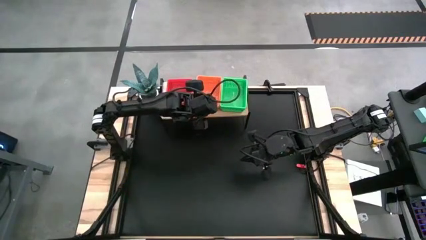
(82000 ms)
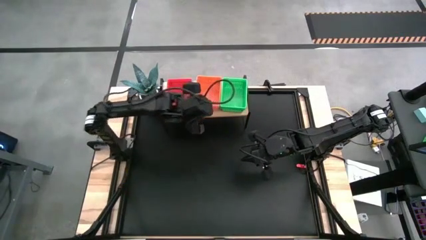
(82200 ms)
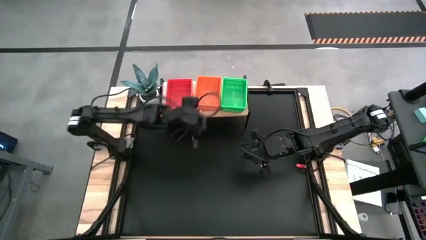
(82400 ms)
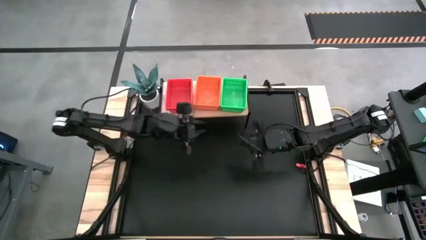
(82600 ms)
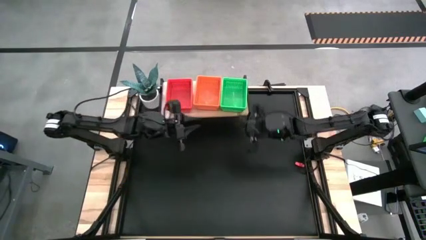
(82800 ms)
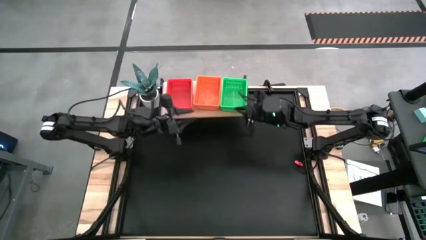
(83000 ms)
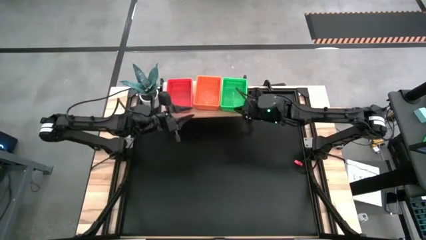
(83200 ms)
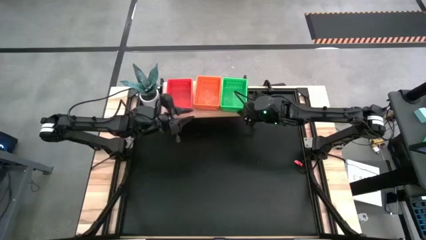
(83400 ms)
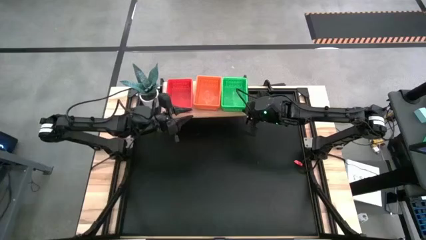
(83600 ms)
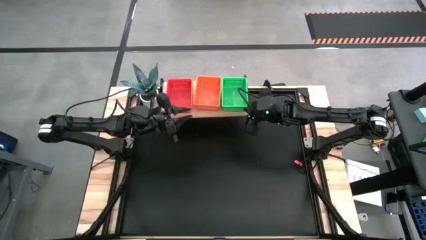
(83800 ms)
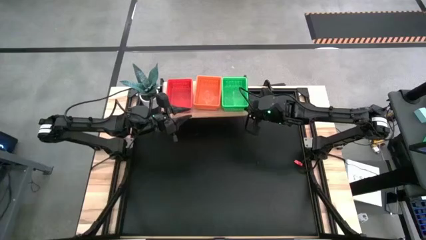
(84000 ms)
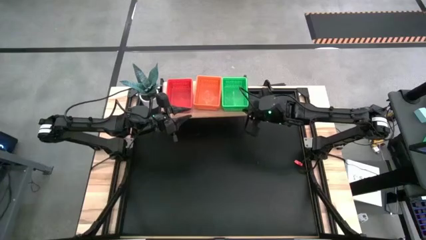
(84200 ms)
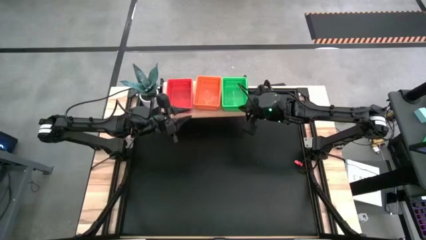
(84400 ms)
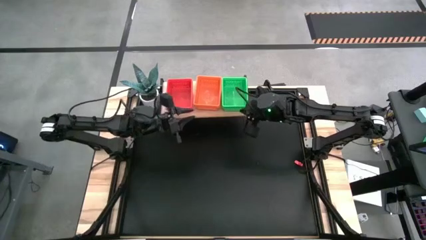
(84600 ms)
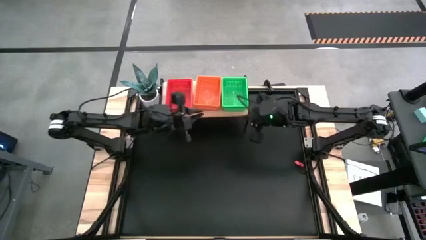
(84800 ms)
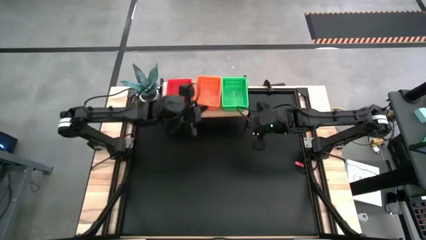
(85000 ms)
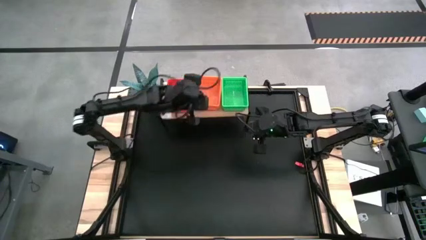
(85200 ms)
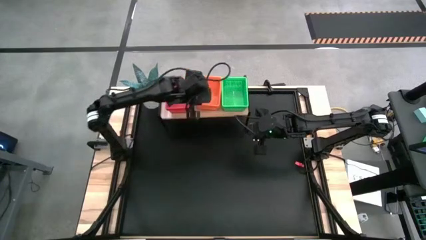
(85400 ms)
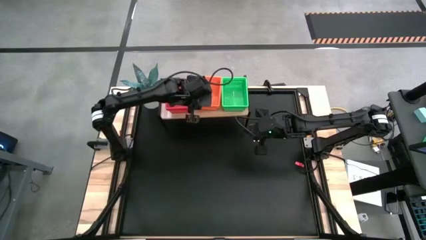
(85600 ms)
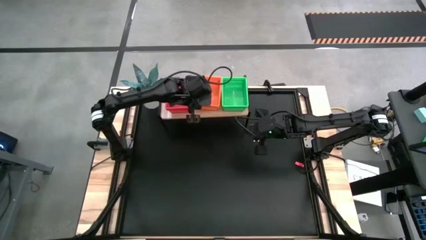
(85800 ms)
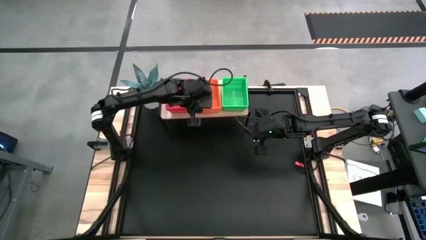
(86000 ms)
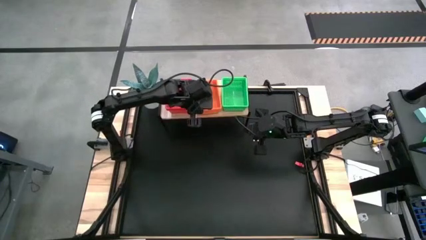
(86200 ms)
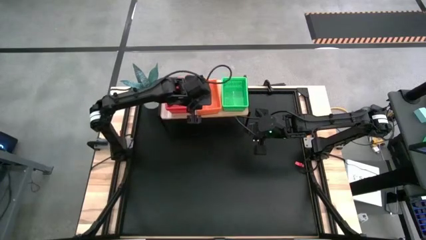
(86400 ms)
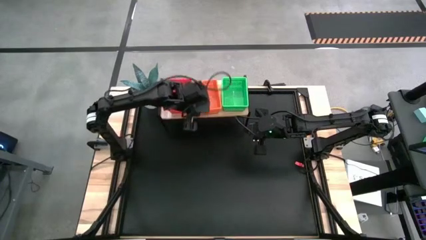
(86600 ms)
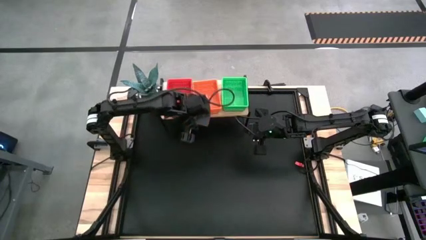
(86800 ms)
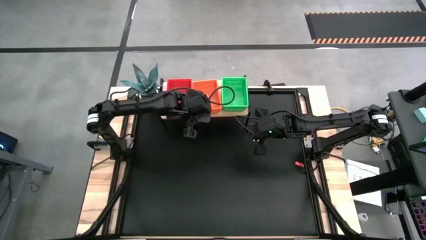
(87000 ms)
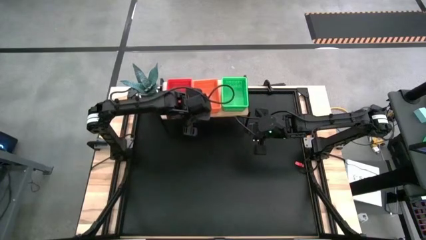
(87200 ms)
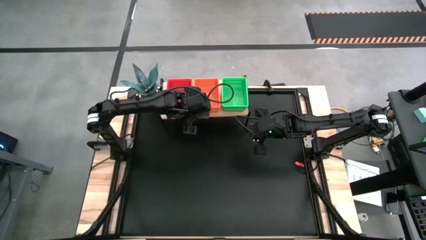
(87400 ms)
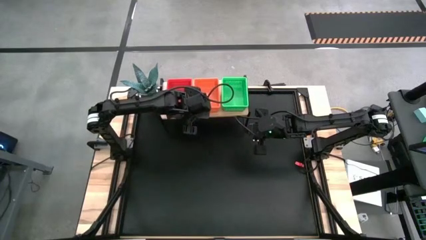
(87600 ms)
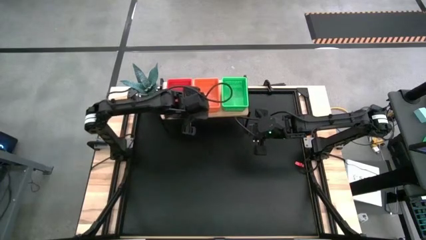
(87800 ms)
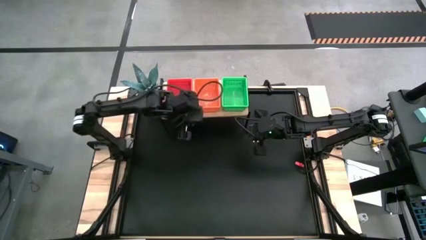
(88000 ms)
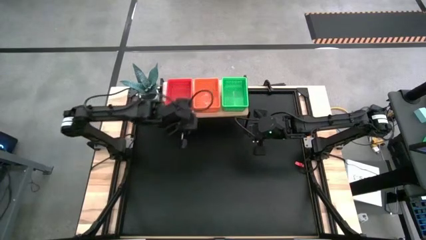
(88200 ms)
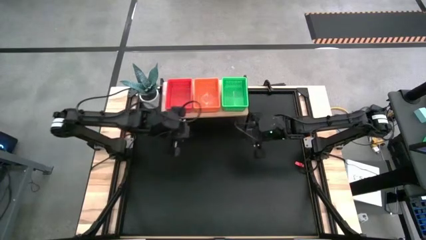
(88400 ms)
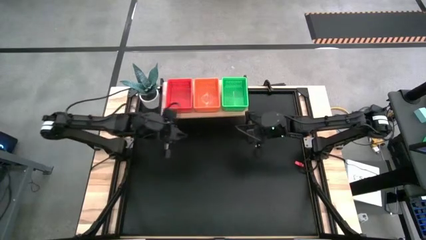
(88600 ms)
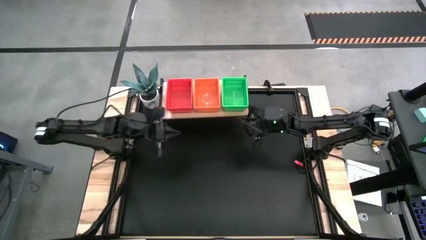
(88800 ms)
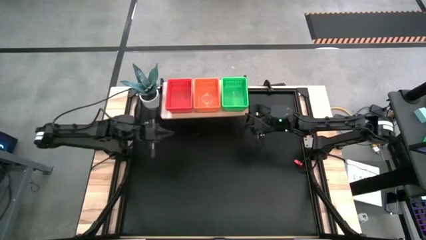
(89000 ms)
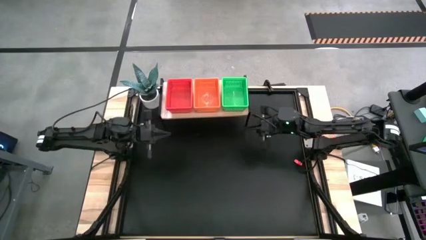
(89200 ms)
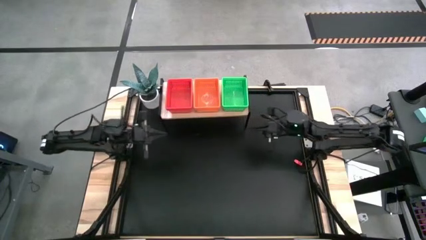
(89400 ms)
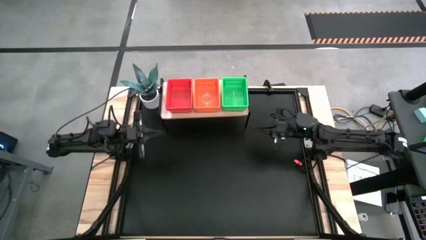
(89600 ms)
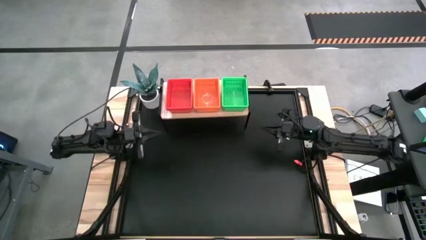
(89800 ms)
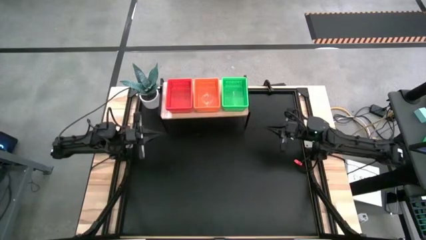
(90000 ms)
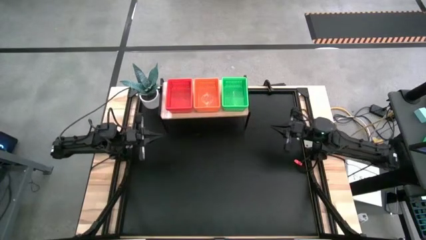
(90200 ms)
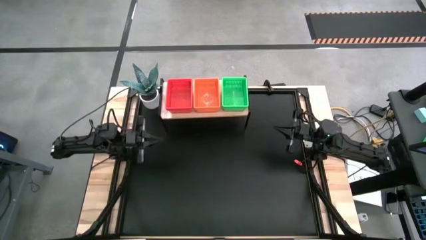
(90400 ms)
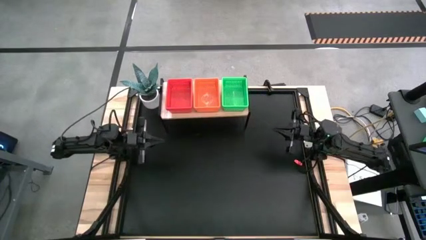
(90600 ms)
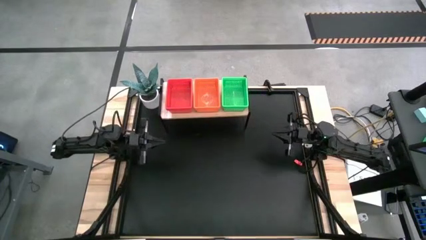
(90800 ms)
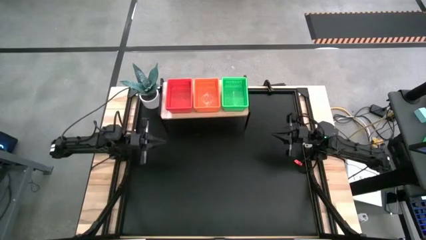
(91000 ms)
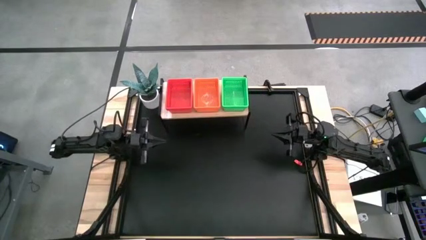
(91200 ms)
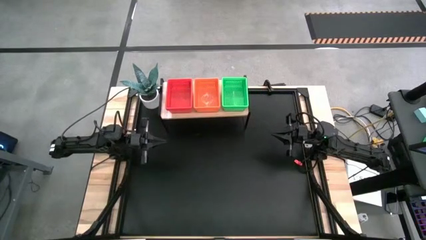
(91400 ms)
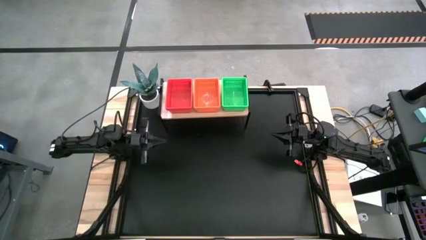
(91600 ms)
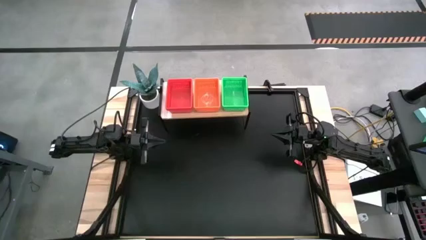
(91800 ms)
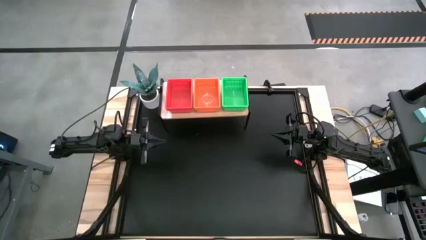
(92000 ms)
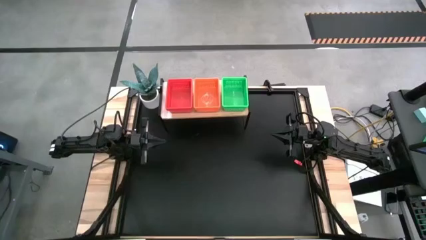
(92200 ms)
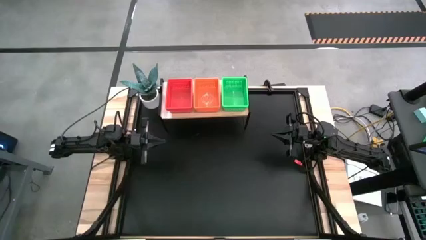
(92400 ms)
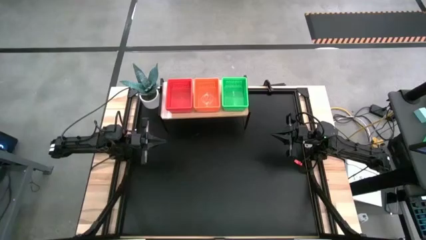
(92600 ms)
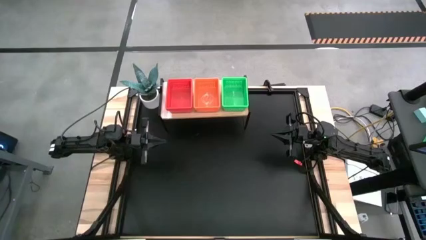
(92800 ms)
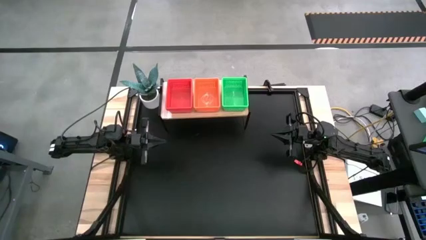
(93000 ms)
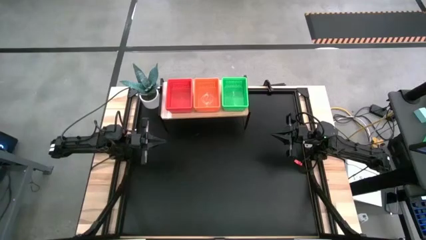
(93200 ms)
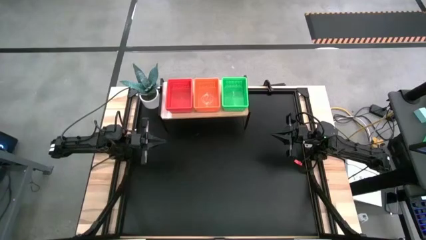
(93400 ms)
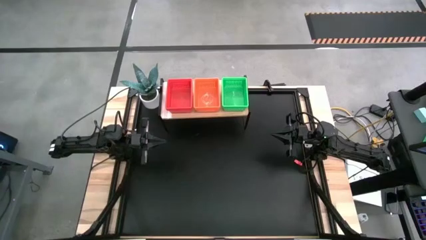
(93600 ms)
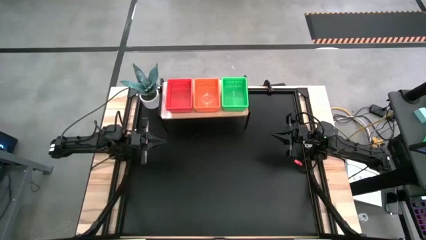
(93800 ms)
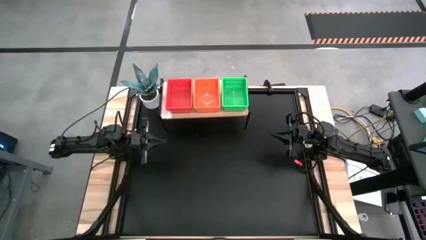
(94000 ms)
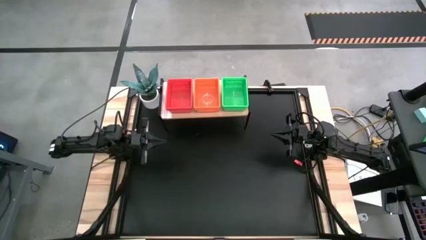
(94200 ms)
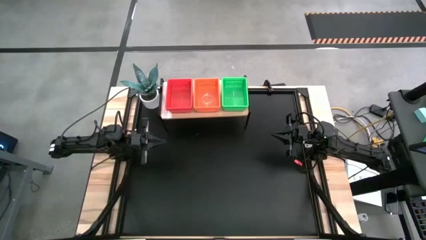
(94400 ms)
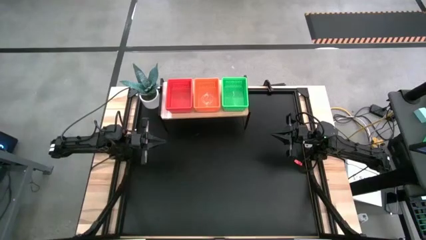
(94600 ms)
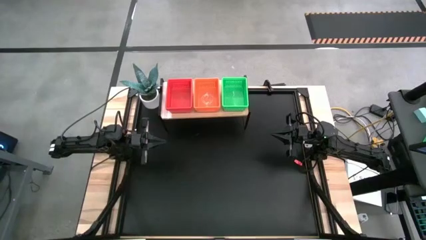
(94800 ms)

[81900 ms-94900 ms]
Return to Home Position
